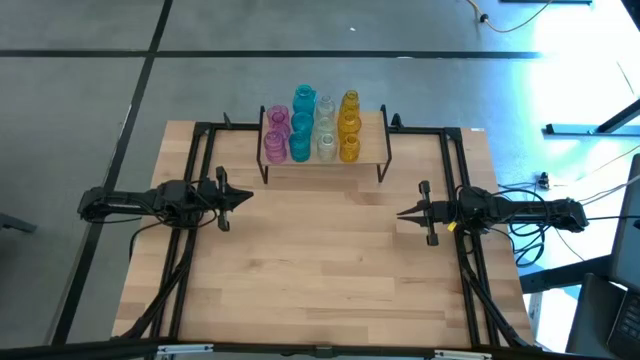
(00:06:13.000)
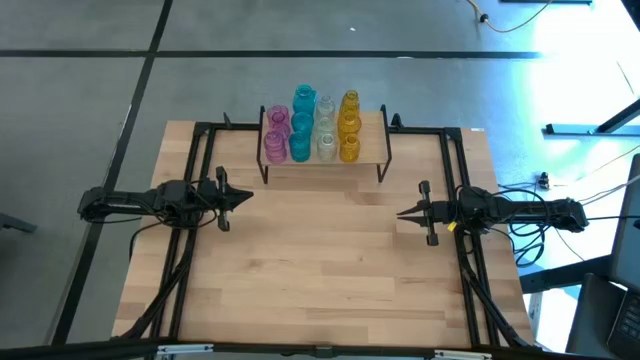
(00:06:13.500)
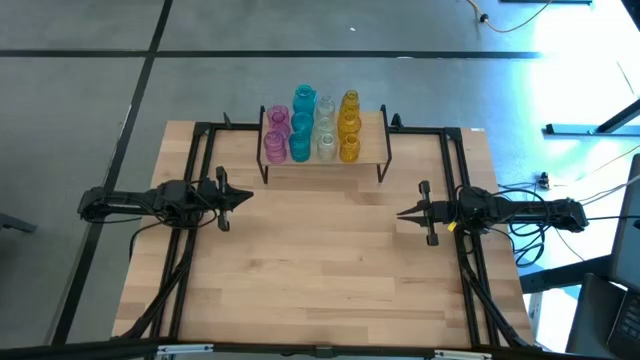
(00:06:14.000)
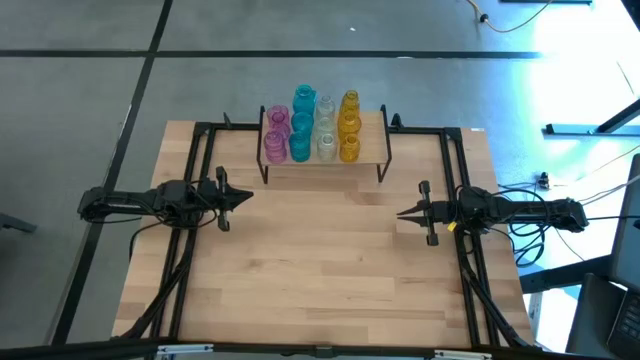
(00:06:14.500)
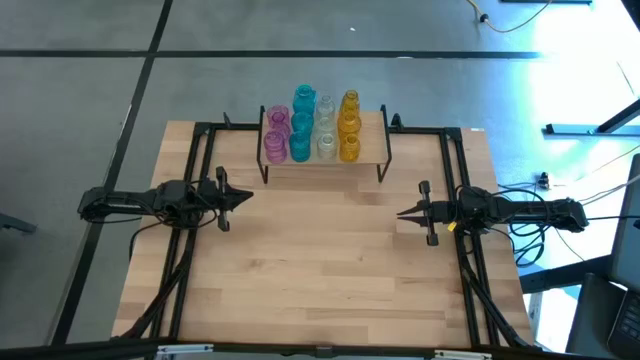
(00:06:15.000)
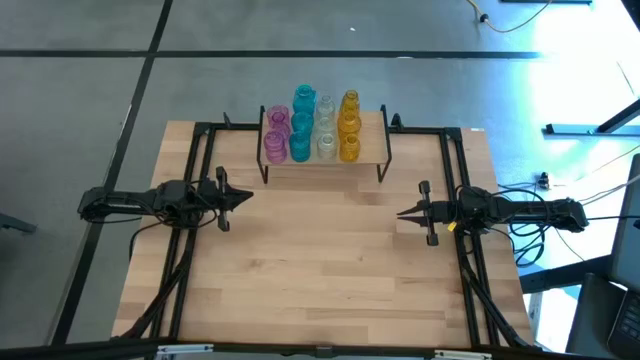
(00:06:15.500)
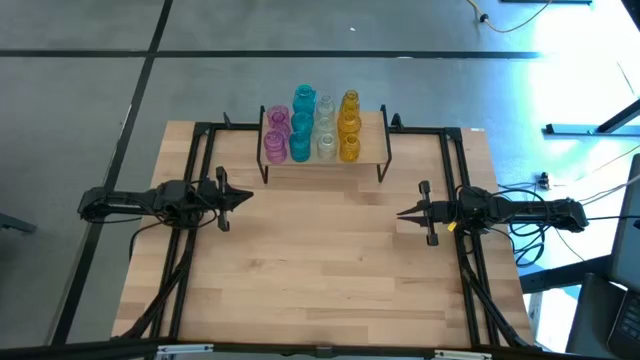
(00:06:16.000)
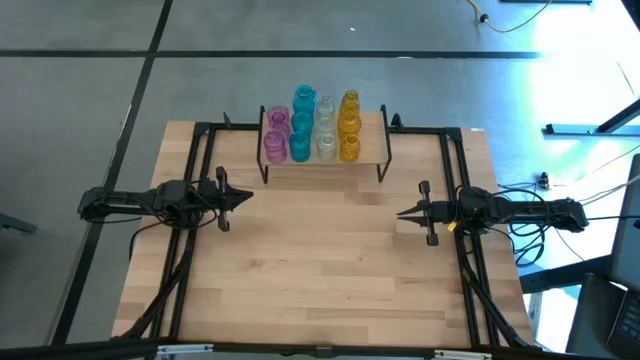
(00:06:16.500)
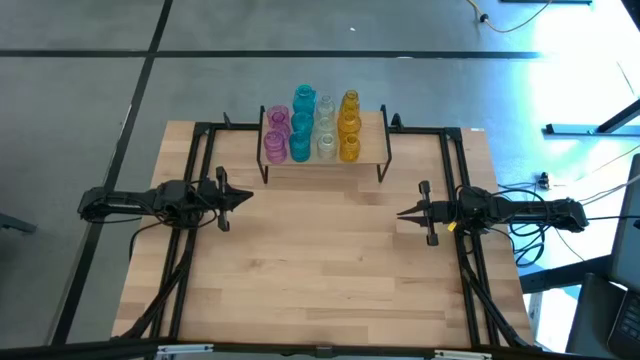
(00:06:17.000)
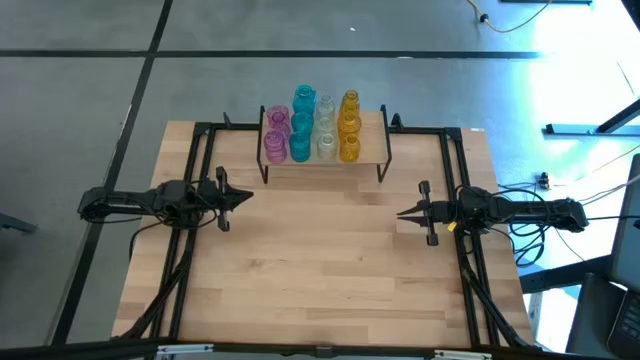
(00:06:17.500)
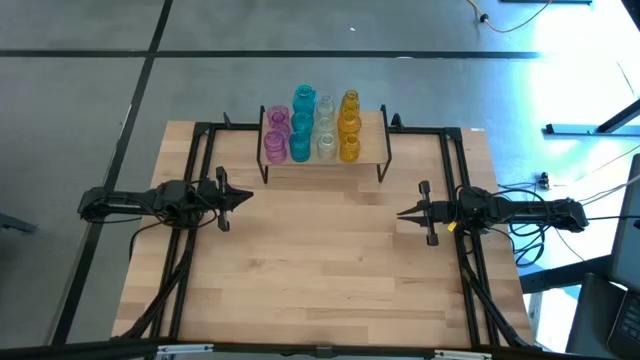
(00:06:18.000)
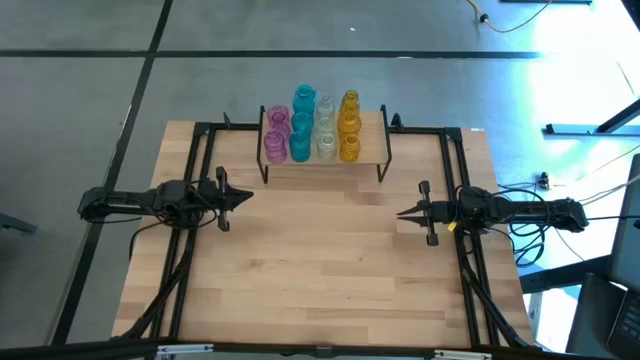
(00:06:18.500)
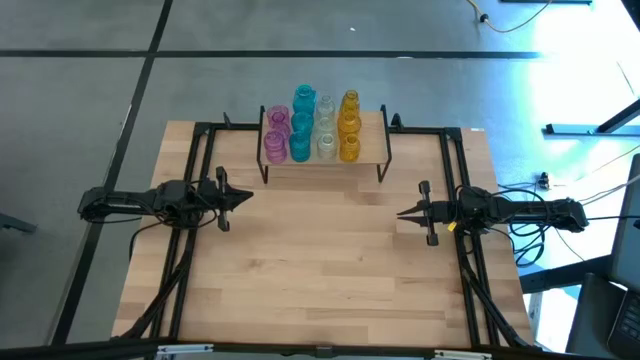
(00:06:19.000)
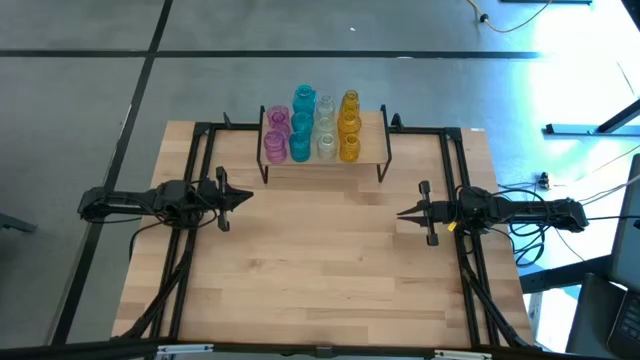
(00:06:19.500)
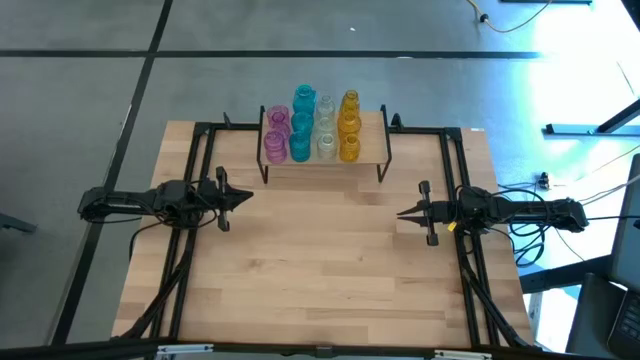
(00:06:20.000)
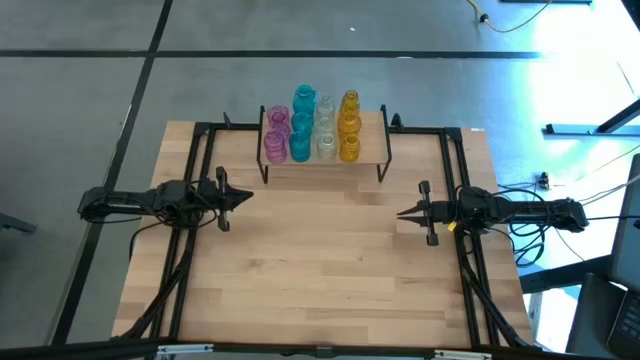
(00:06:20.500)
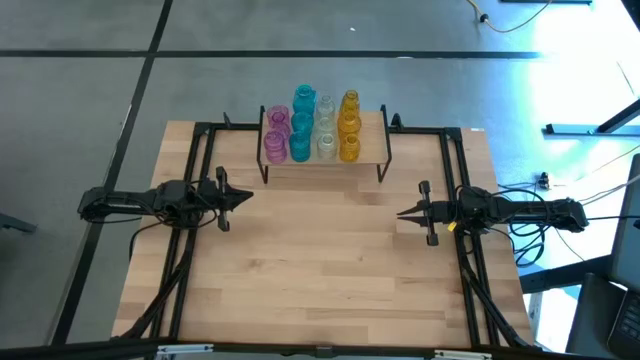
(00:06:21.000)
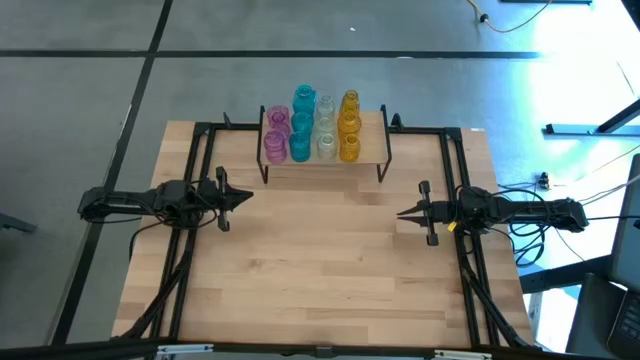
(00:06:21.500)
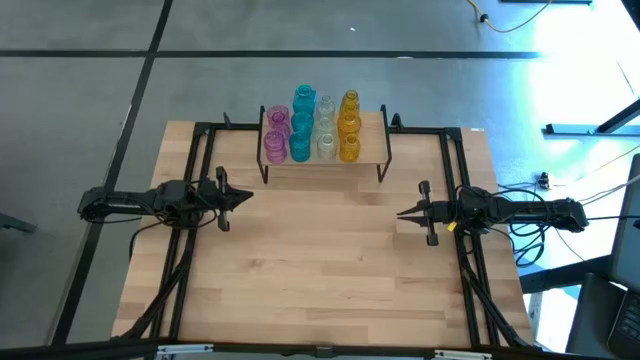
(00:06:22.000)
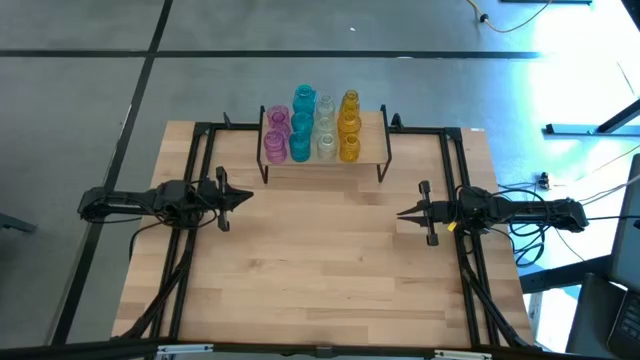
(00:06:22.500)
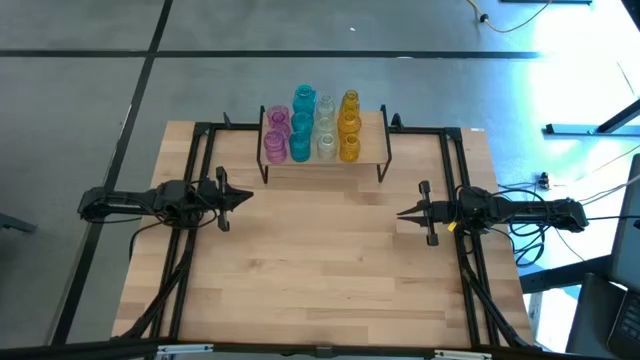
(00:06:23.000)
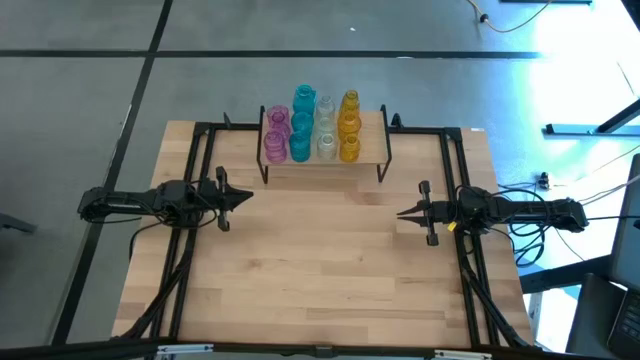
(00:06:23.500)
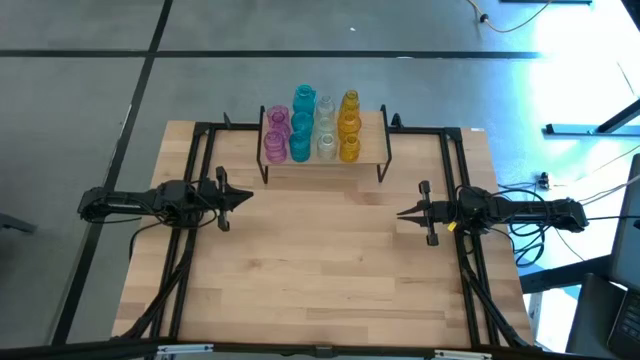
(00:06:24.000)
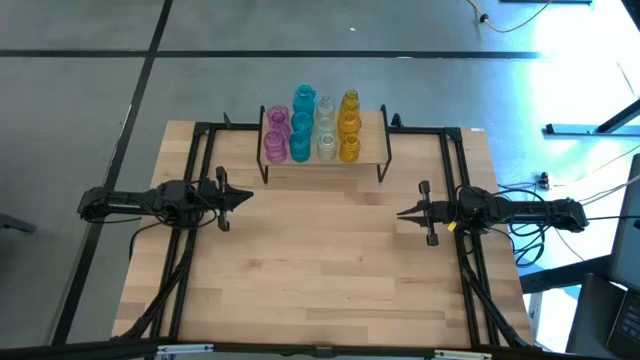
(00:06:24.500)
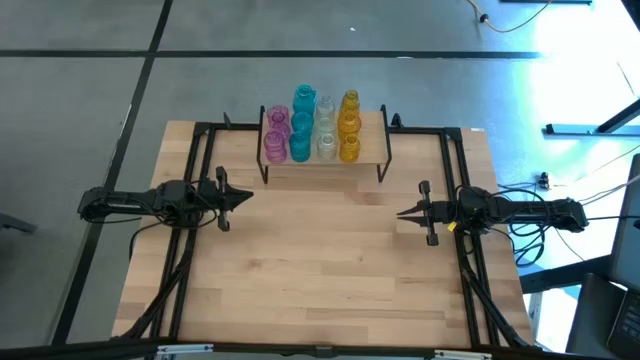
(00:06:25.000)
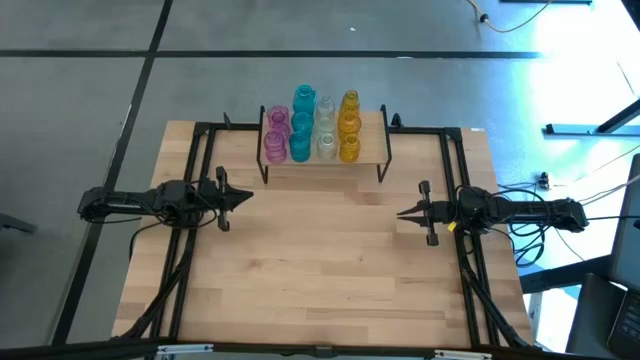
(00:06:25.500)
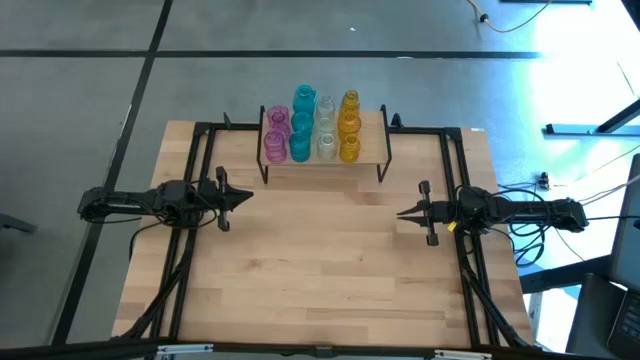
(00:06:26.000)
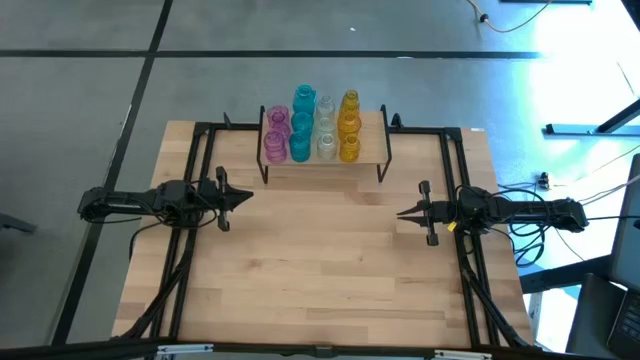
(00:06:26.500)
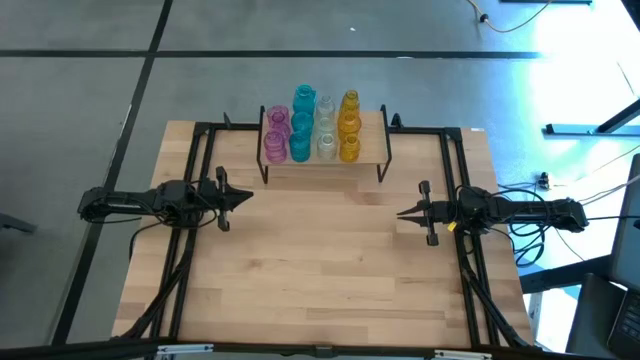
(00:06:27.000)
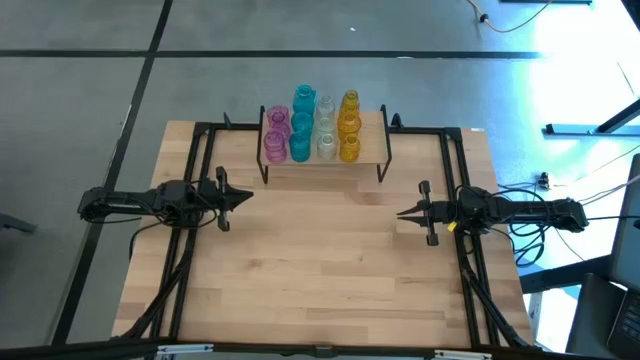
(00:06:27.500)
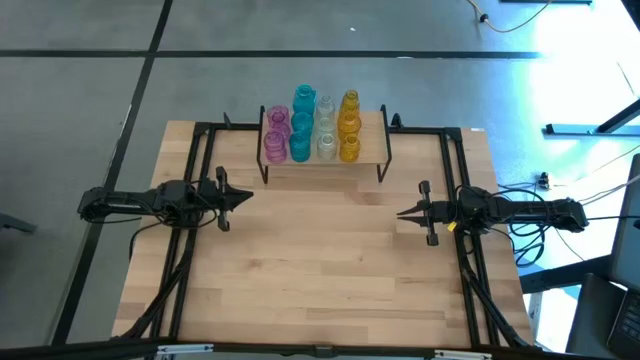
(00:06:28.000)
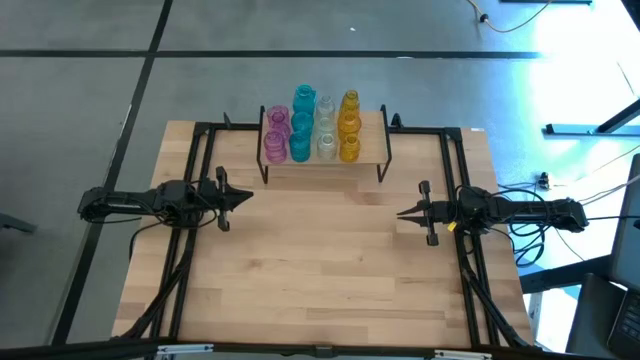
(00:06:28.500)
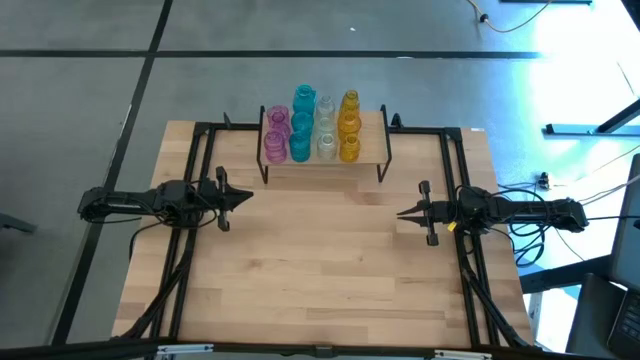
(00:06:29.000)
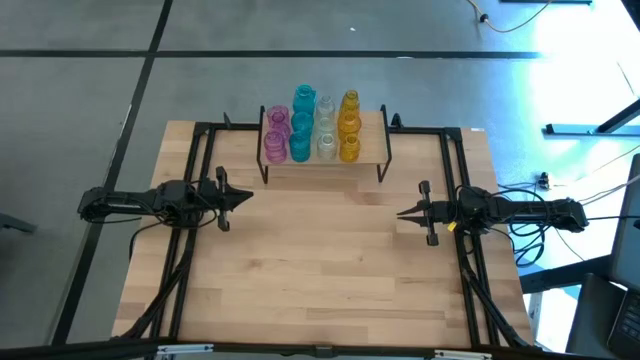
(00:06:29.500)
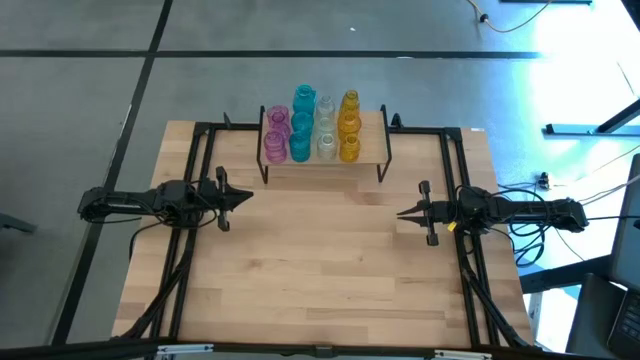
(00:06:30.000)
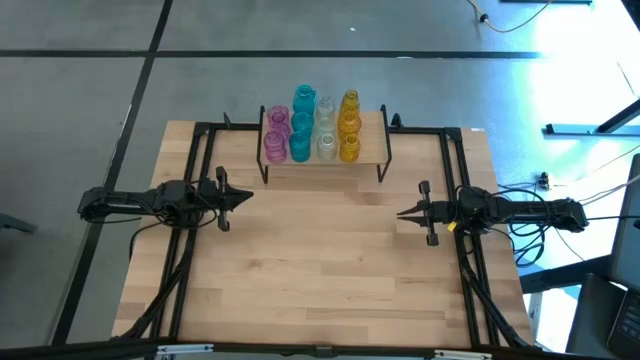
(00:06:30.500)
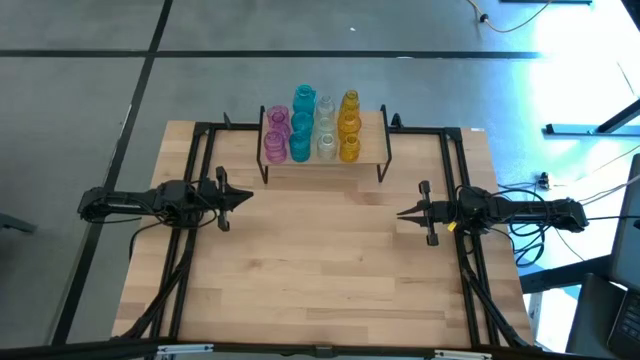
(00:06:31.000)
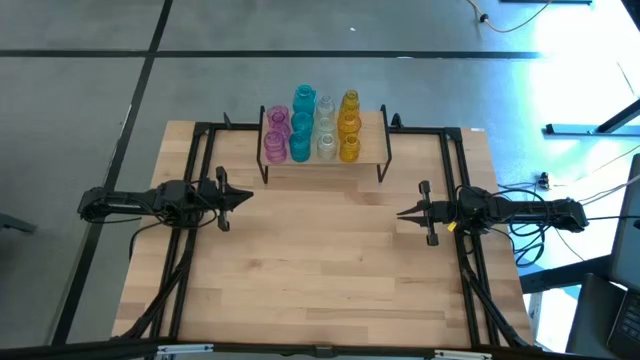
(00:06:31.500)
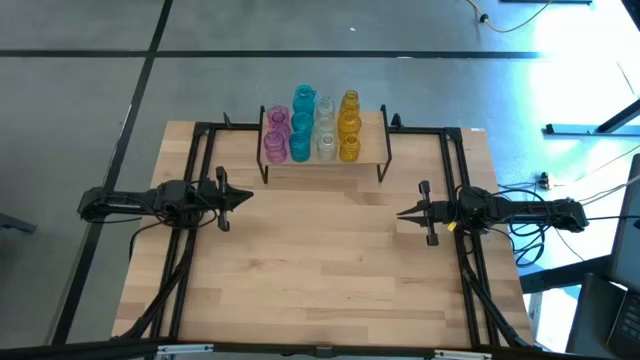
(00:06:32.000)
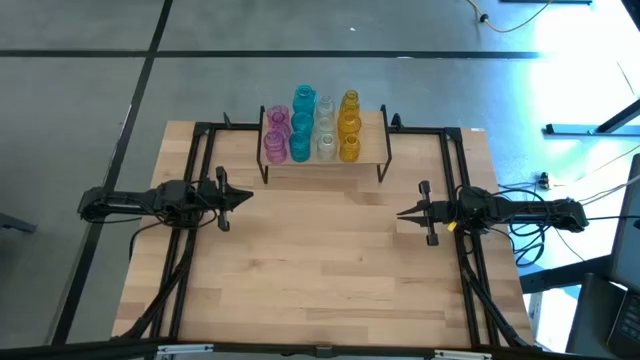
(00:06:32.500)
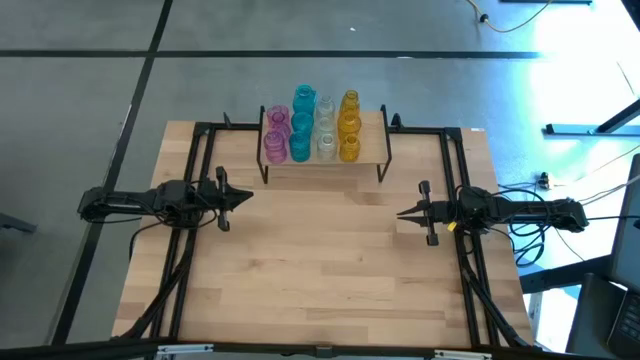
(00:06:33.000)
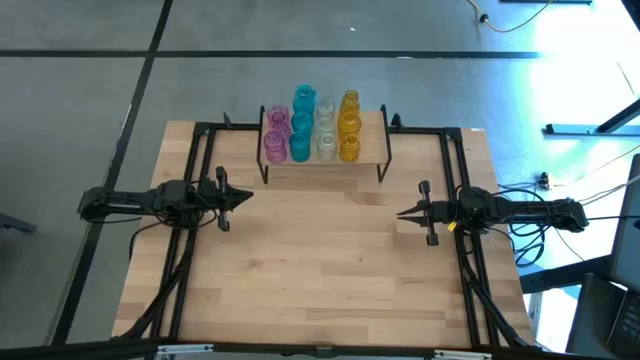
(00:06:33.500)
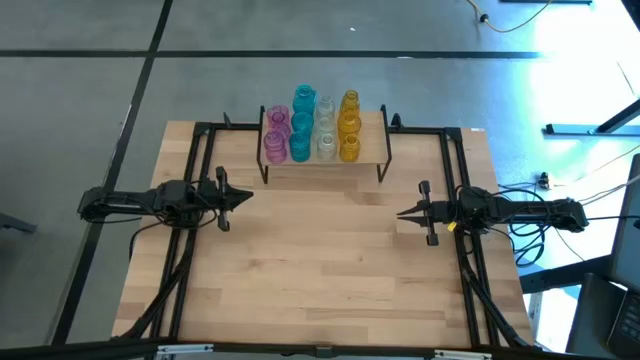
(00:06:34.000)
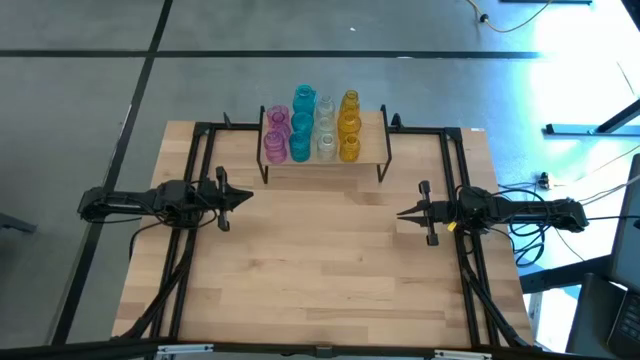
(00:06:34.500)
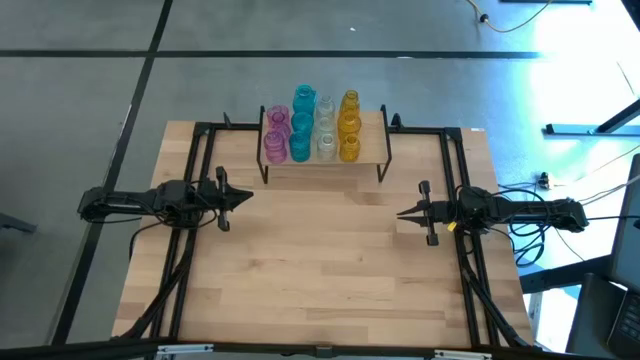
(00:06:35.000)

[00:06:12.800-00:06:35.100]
Task: sort vases onto shelf
Return to Home Position
